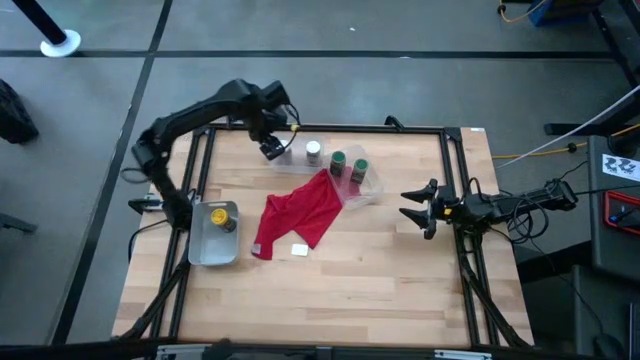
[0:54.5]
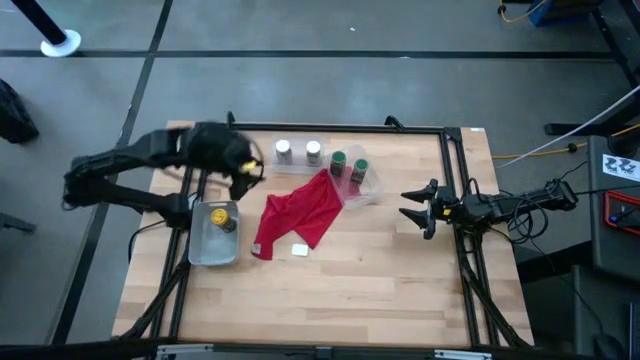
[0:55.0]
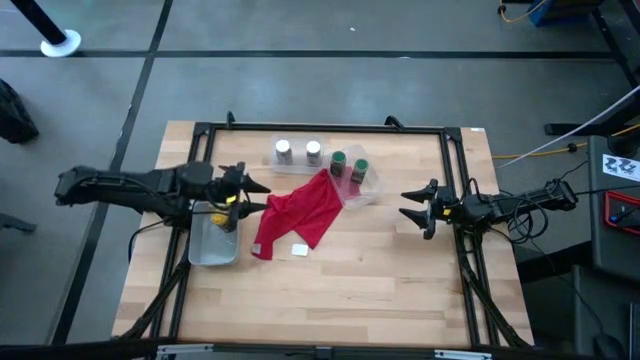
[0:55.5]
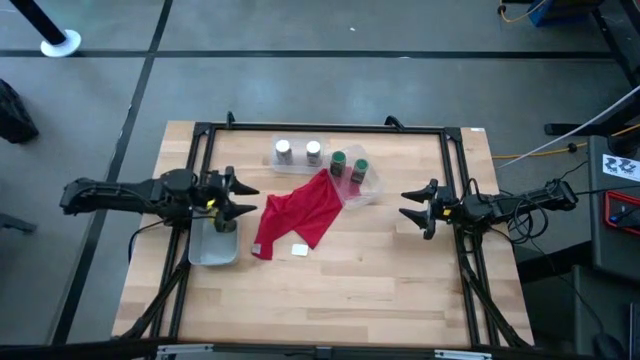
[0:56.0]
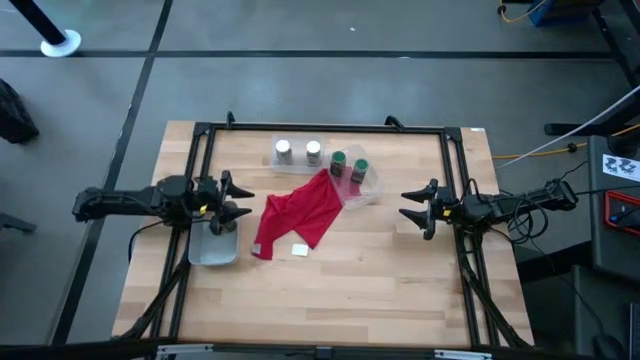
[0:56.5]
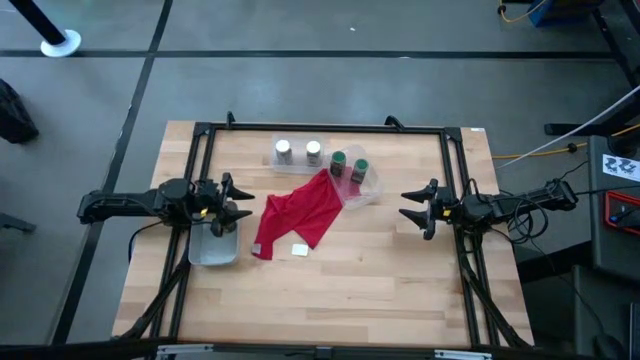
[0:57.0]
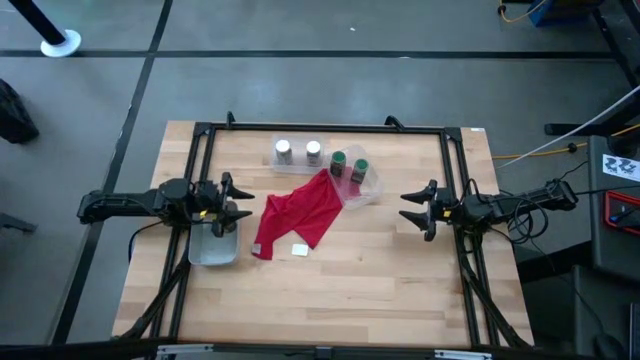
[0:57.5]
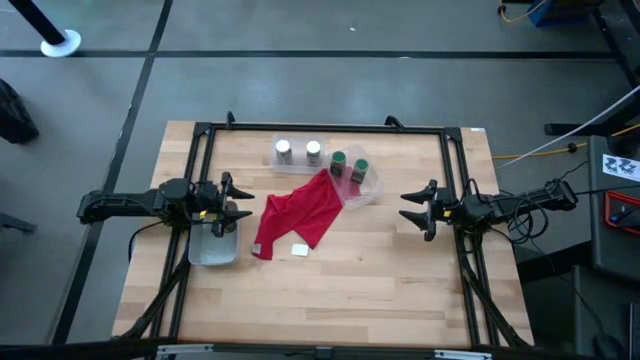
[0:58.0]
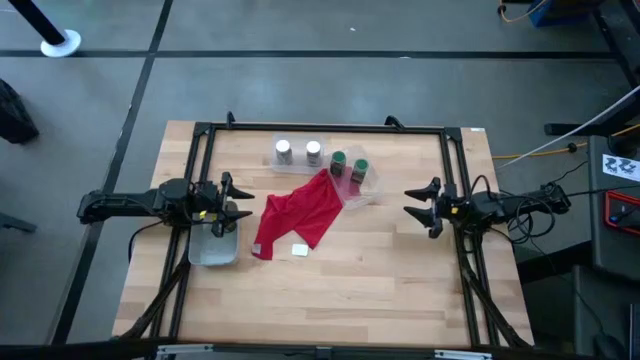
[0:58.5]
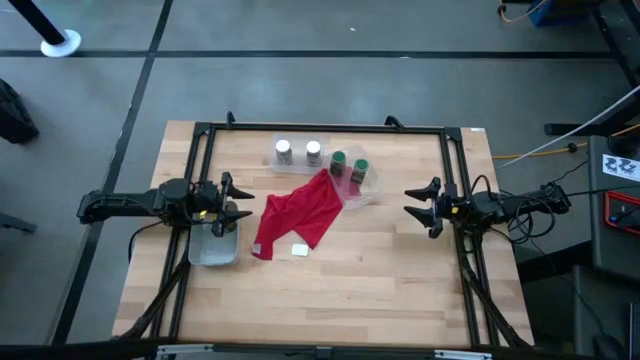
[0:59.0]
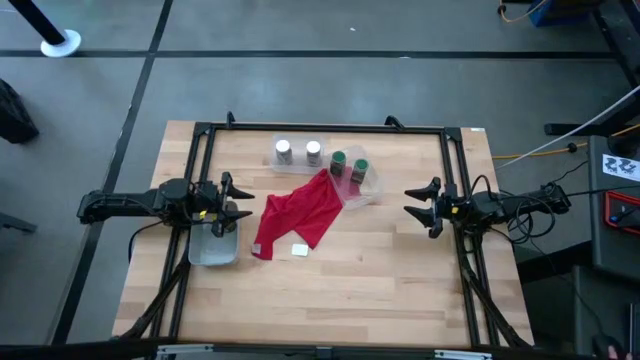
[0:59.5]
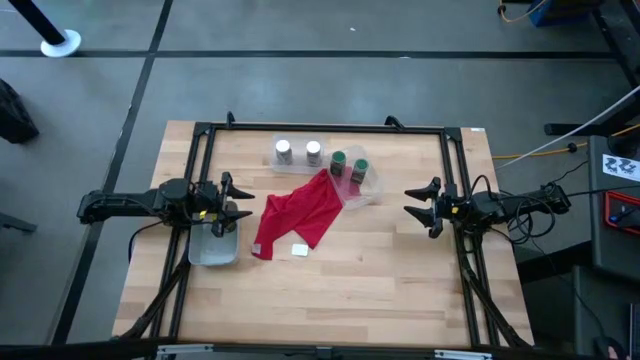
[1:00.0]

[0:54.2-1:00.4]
Task: Sort spices by type
Return to Home Position

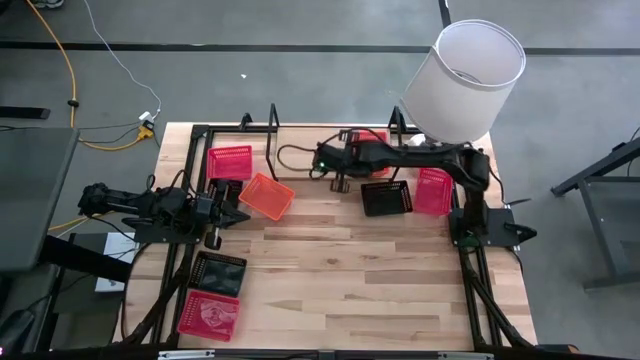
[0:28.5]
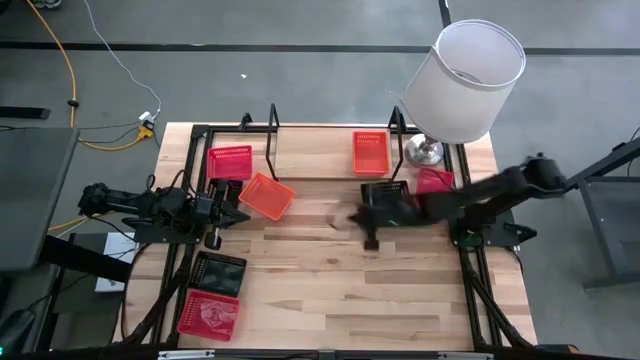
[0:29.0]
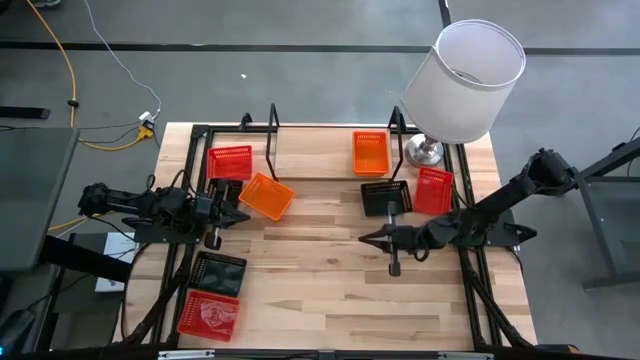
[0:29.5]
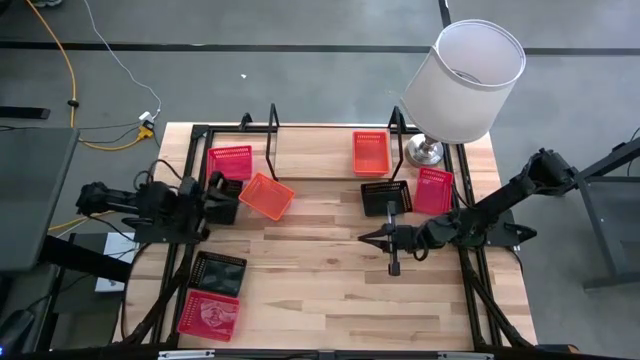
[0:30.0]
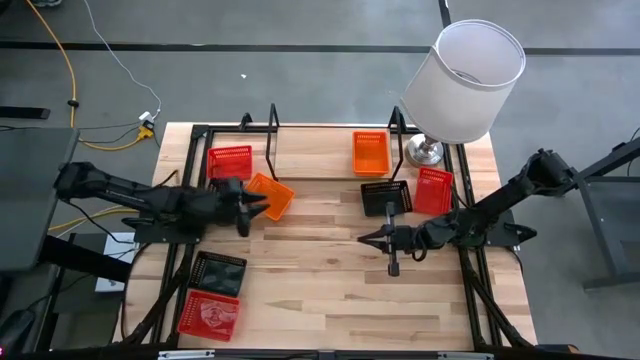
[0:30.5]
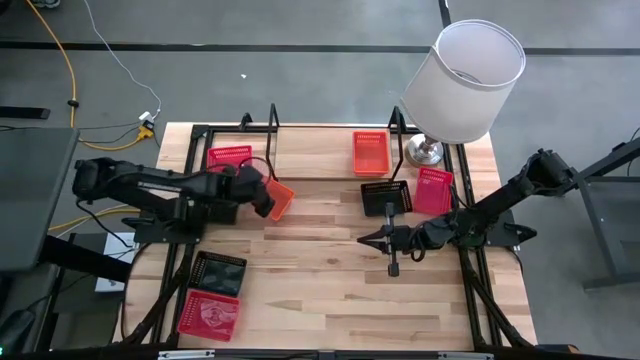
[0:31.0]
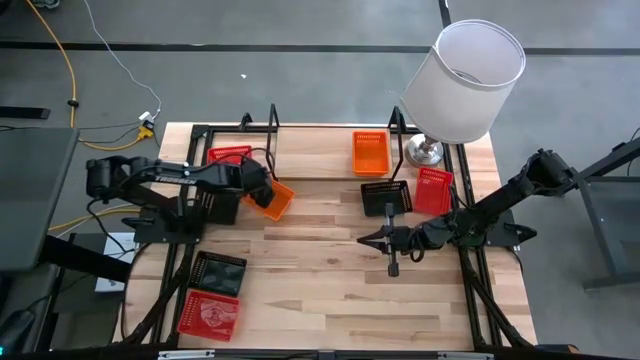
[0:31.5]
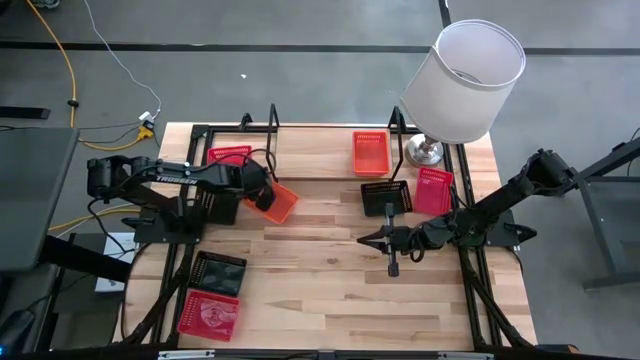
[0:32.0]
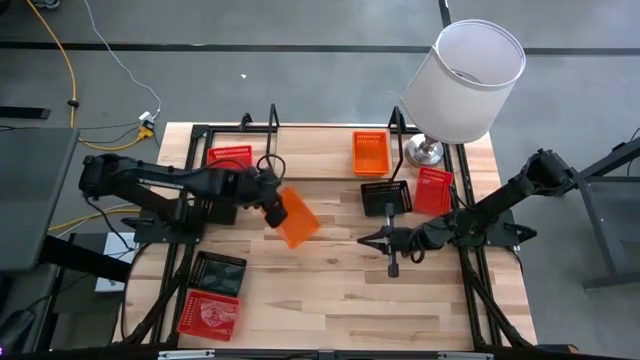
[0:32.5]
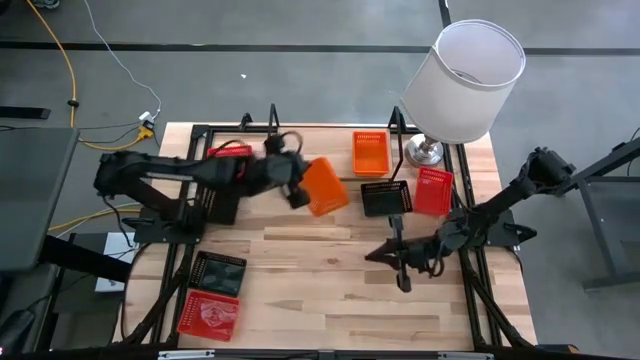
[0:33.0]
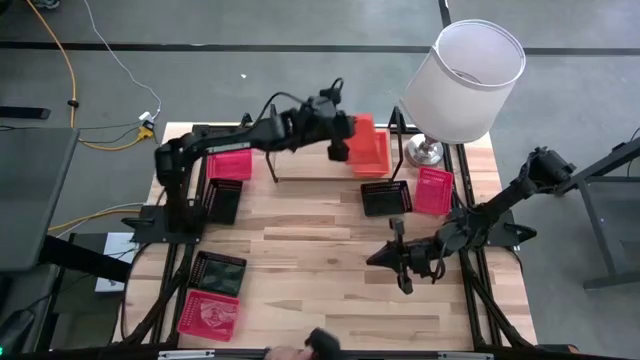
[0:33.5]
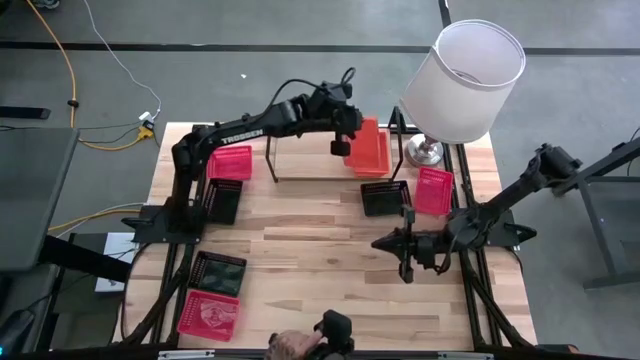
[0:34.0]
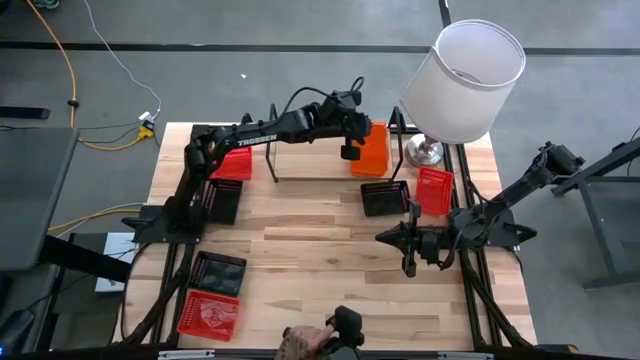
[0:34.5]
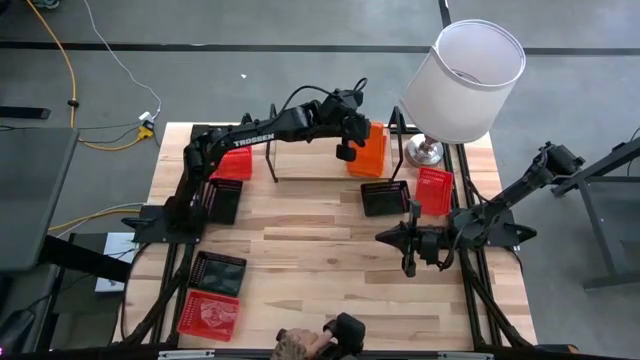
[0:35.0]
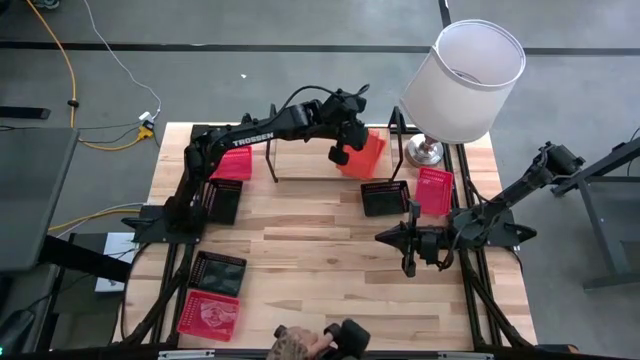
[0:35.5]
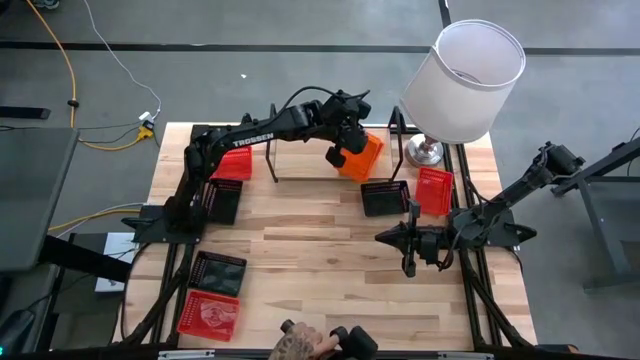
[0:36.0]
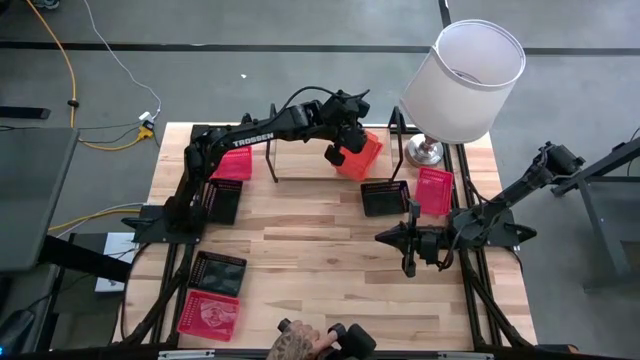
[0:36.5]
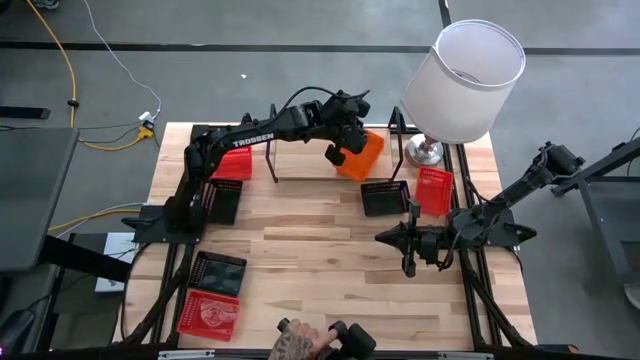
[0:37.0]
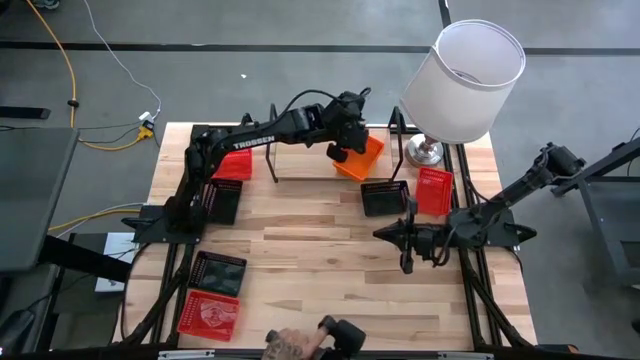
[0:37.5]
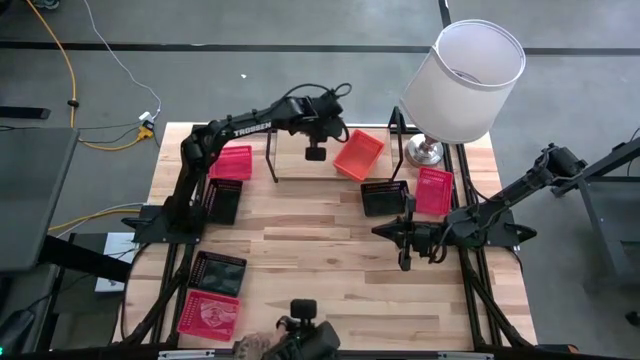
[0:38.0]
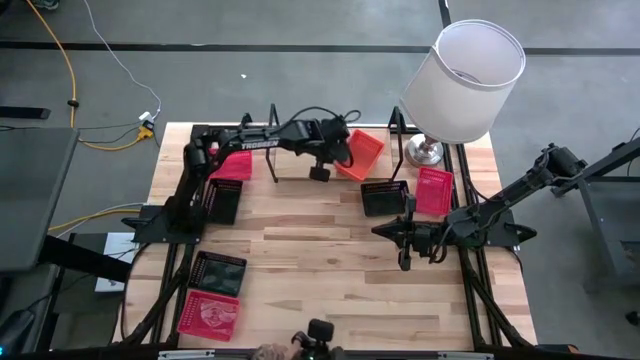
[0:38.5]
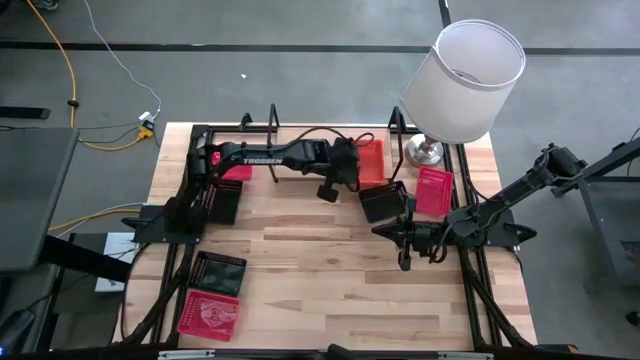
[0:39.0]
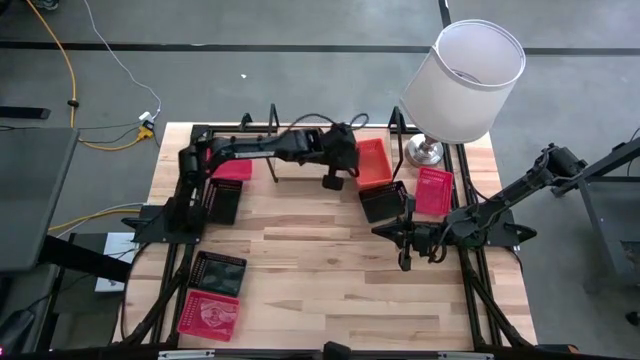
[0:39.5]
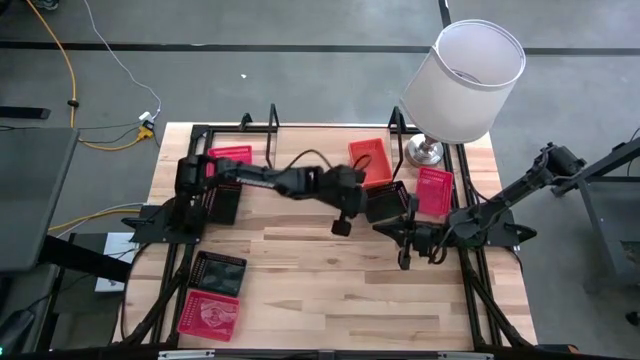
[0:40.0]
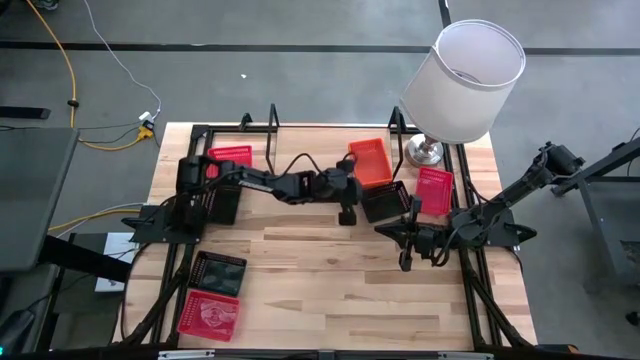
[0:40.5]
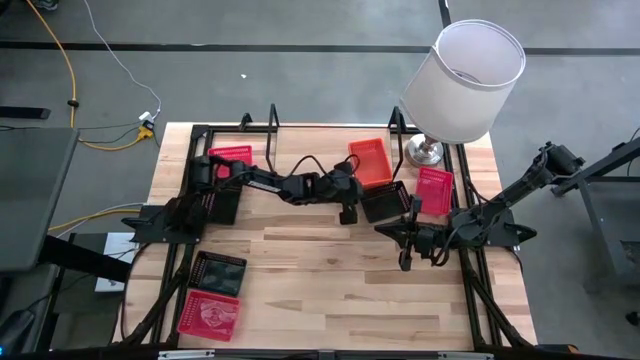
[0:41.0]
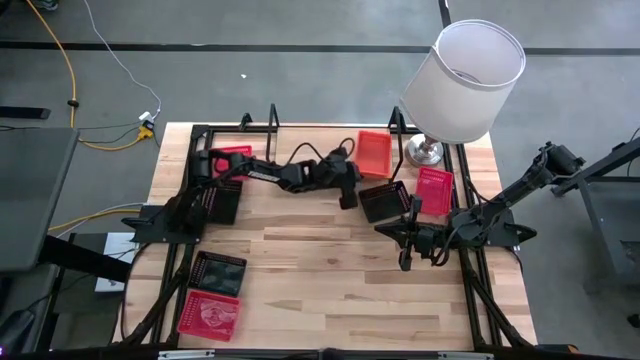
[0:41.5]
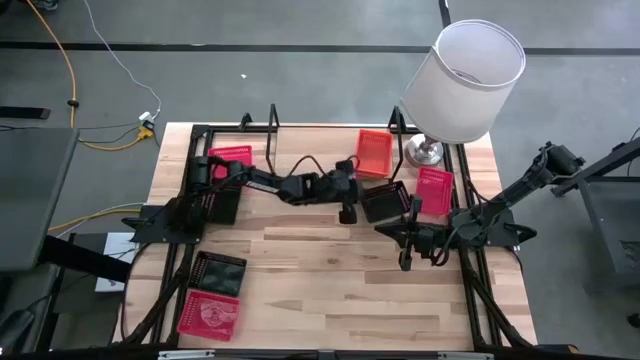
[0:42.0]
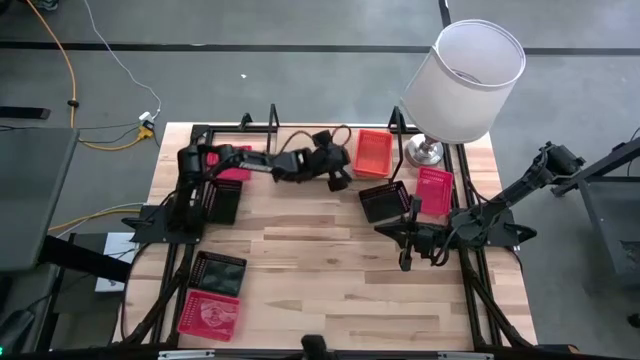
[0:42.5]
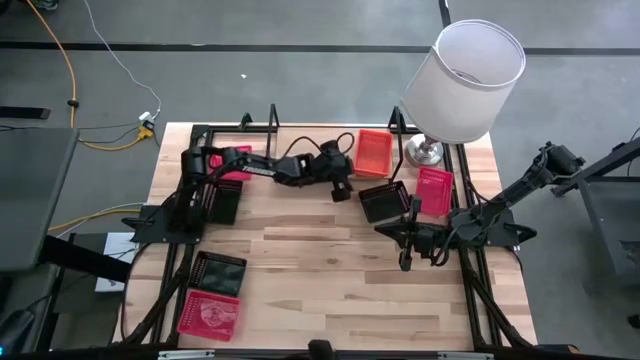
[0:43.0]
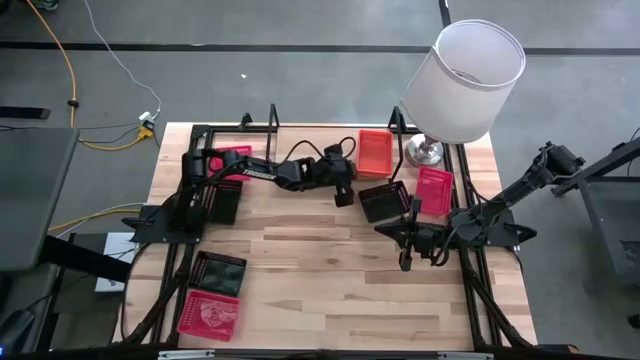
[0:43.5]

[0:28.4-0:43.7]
Task: Stack baskets on shelf by color
Stack the orange basket on top of the orange baskets on the shelf
